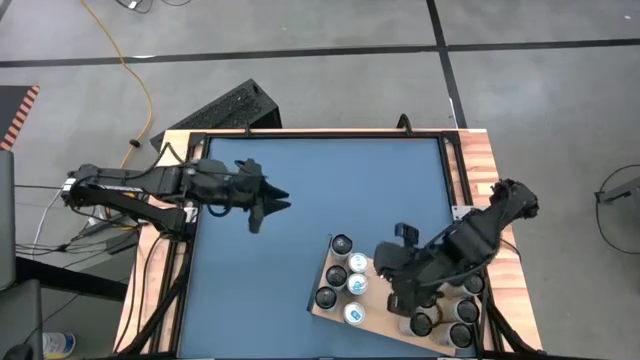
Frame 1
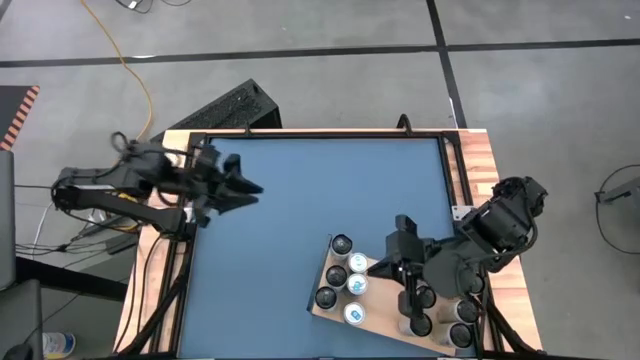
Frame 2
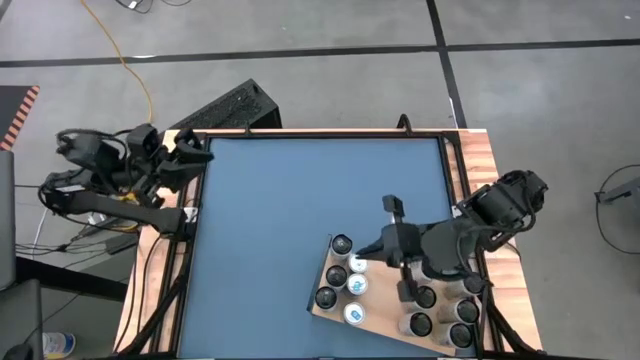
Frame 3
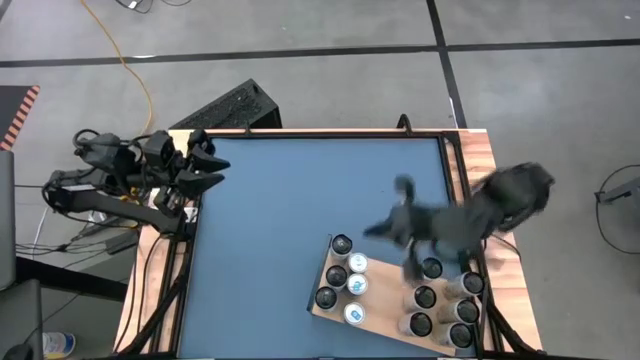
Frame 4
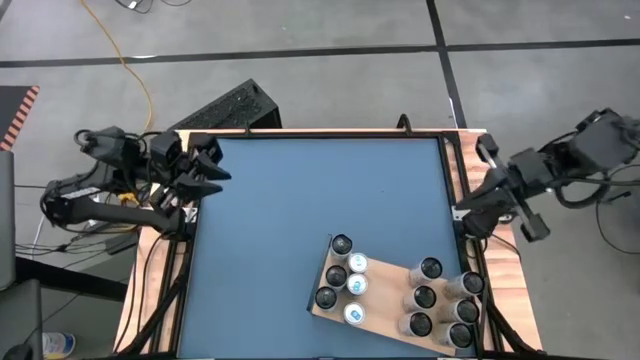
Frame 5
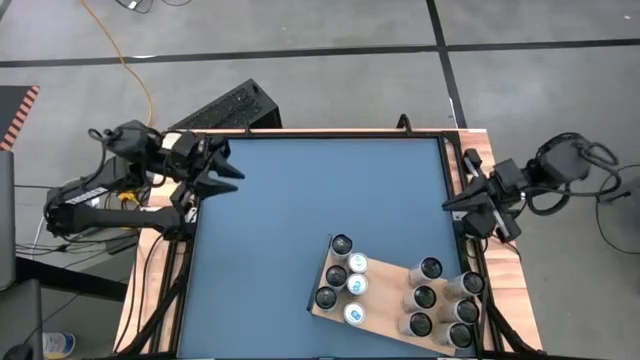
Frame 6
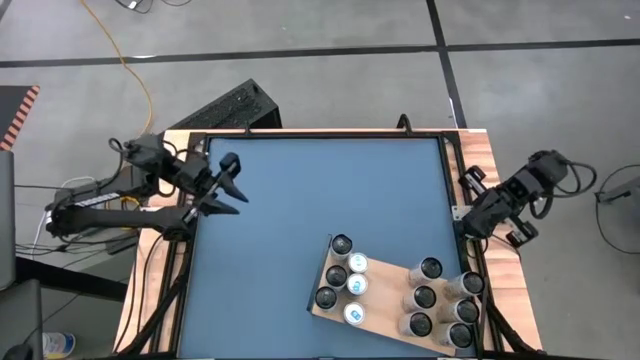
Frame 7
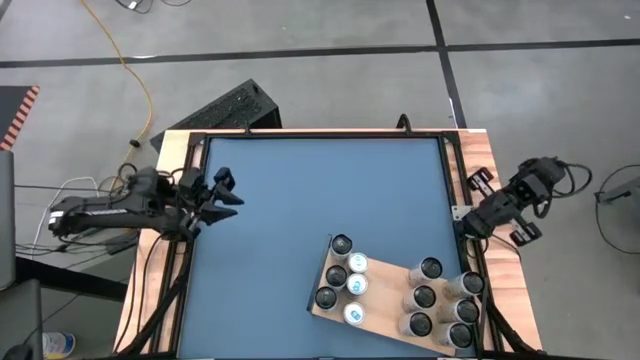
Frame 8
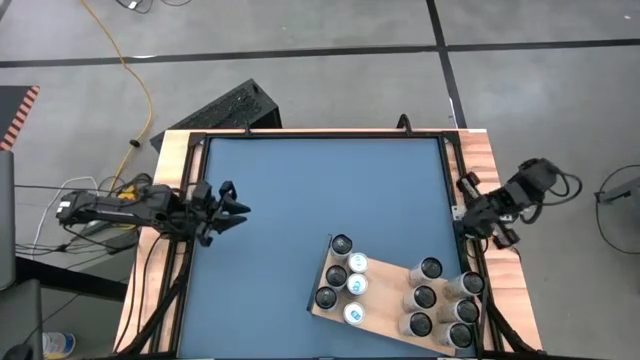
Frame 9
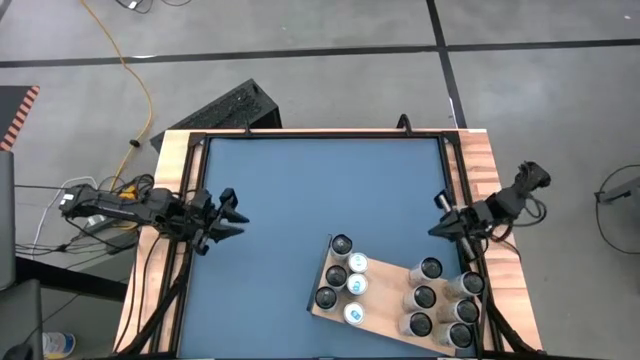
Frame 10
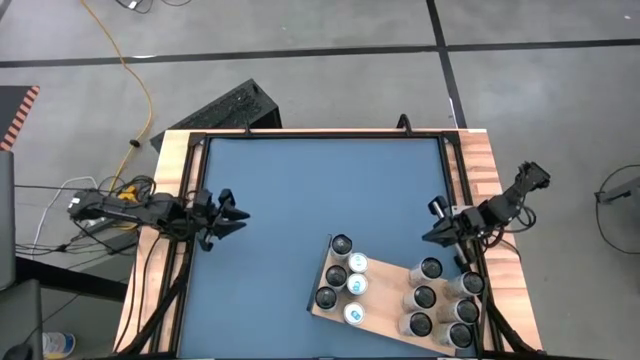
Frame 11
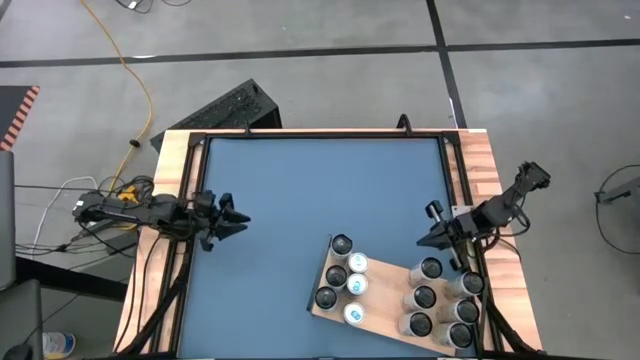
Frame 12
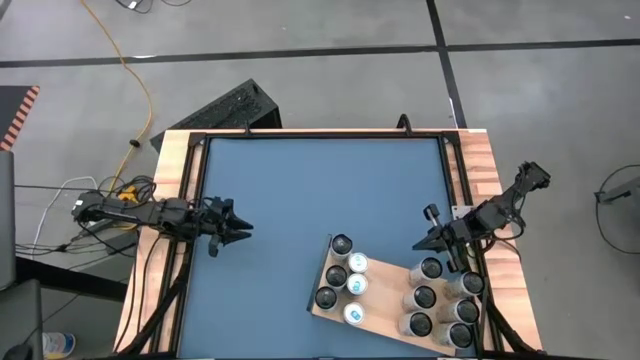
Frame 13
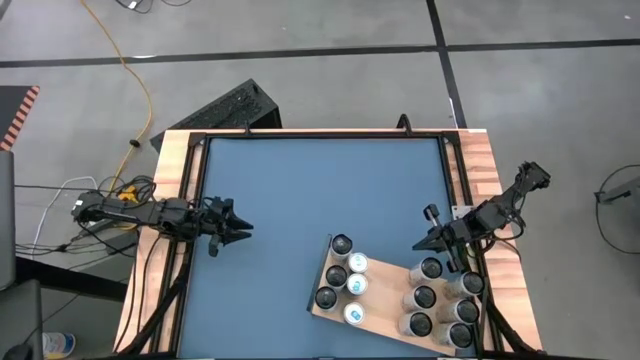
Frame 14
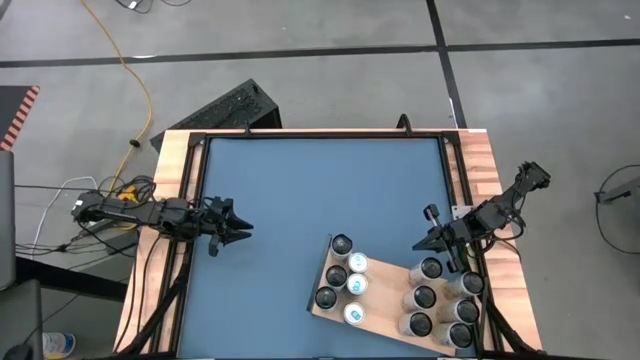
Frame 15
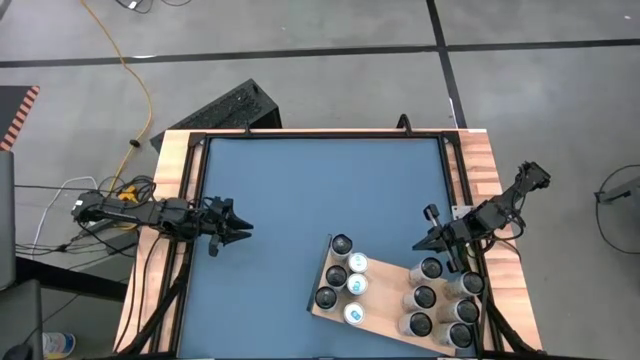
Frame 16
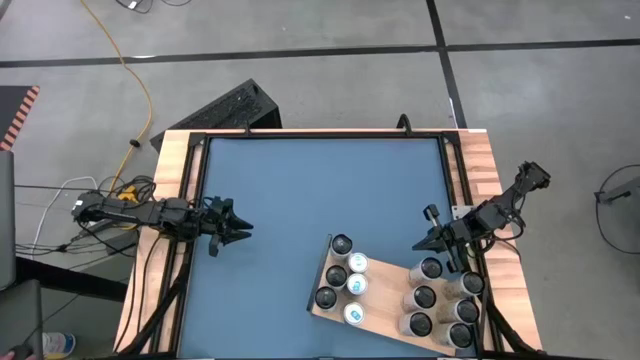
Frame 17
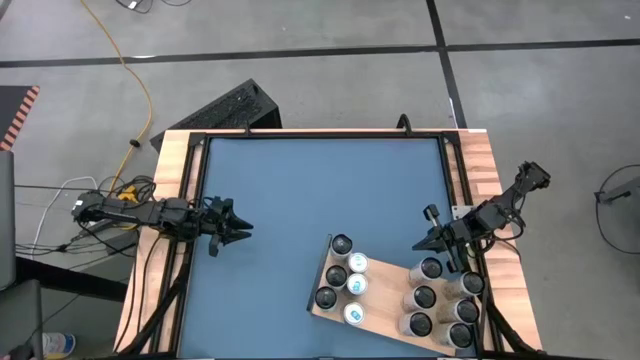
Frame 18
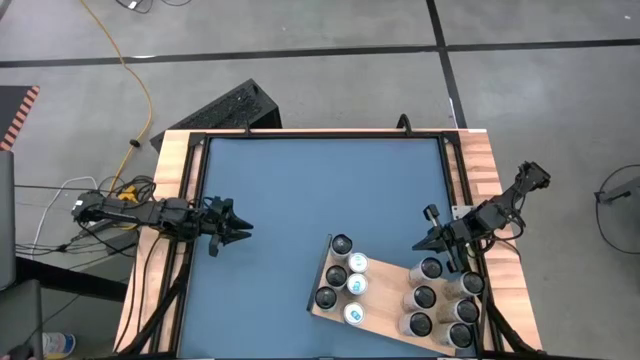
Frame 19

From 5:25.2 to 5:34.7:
Task: Place canned beverage on shelf
Return to Home Position

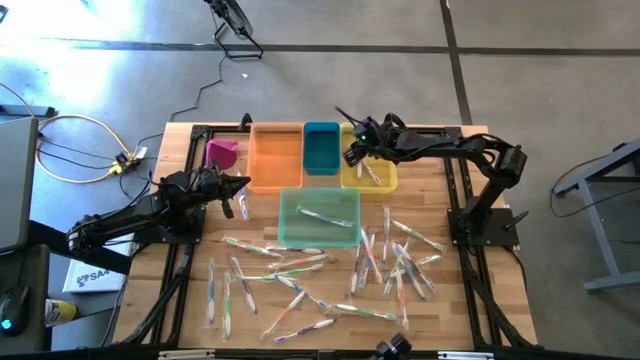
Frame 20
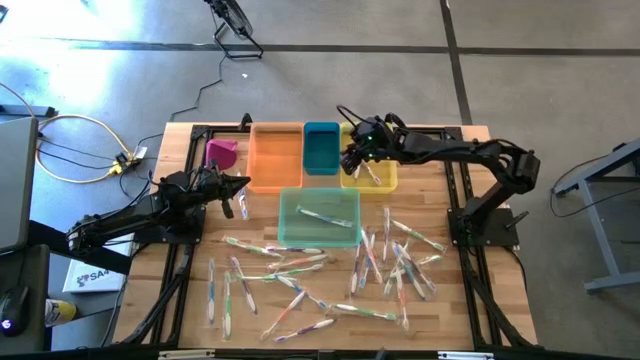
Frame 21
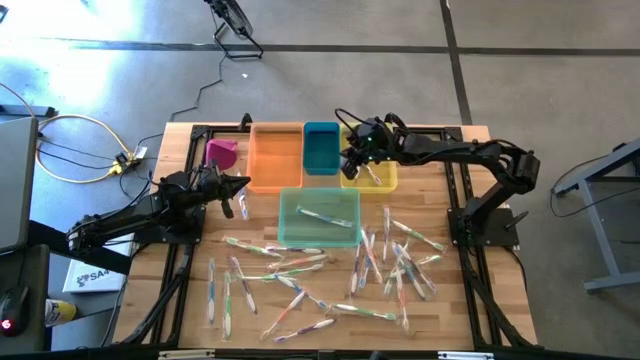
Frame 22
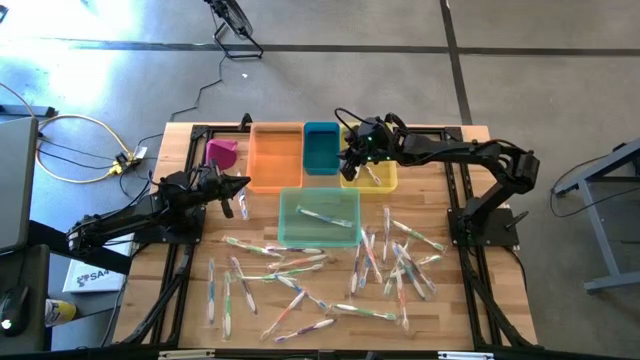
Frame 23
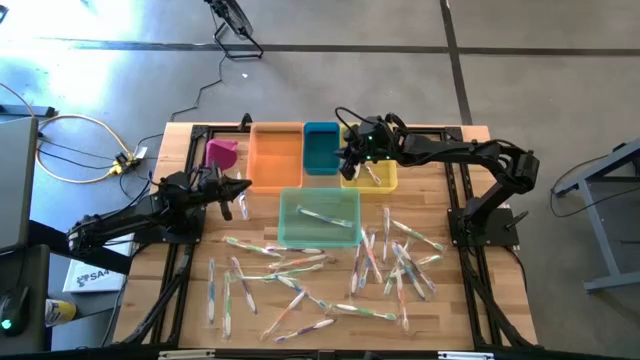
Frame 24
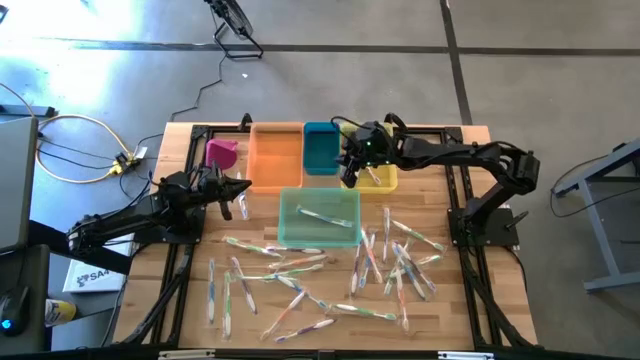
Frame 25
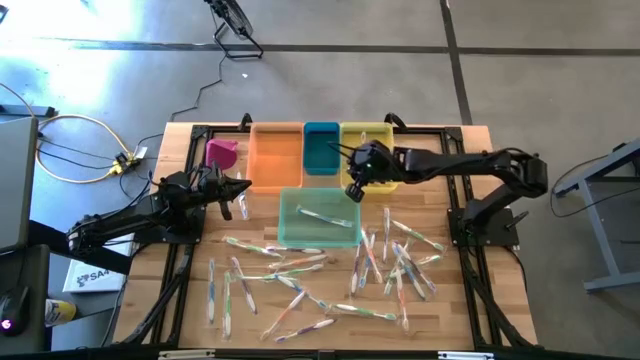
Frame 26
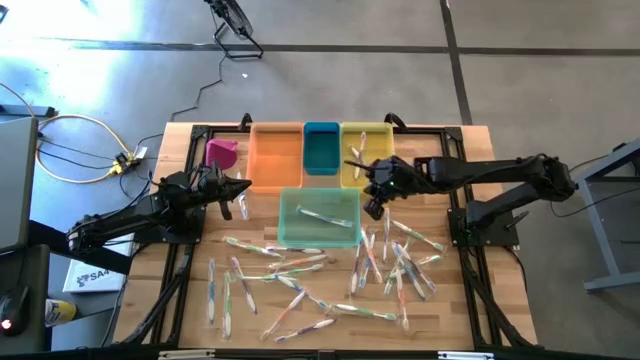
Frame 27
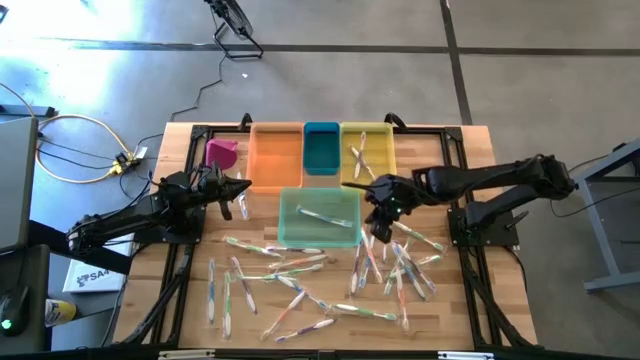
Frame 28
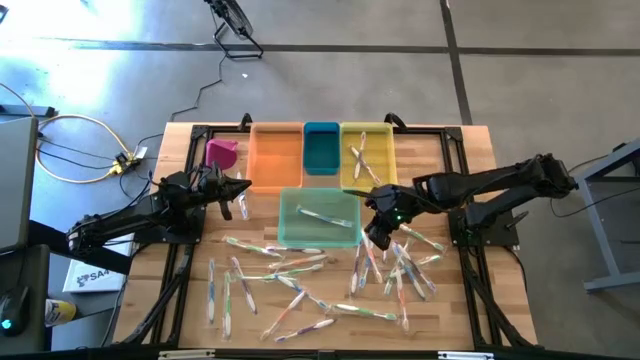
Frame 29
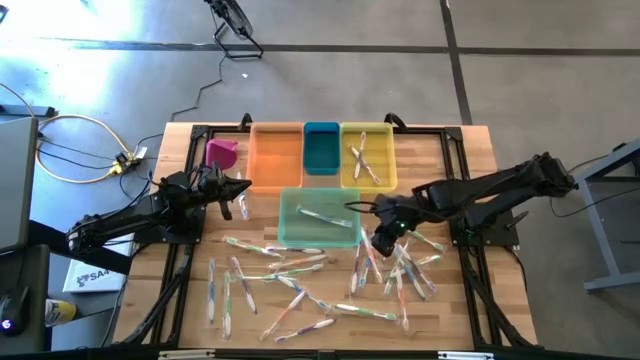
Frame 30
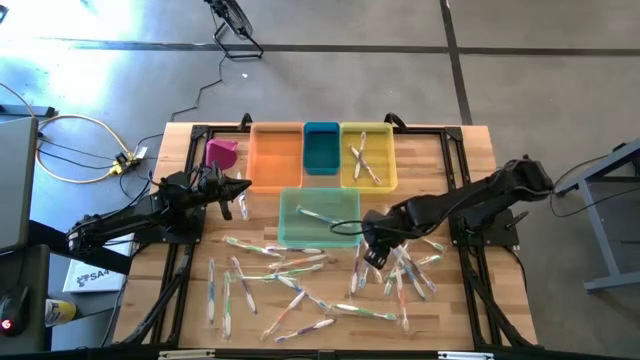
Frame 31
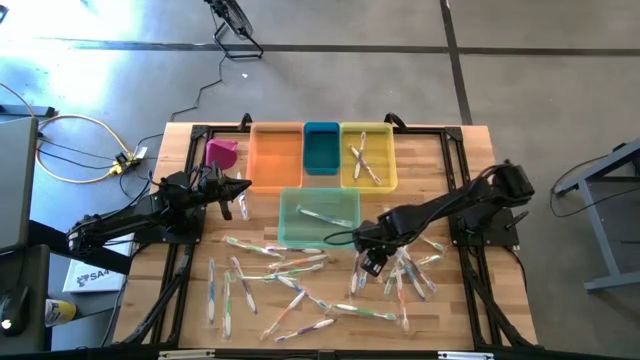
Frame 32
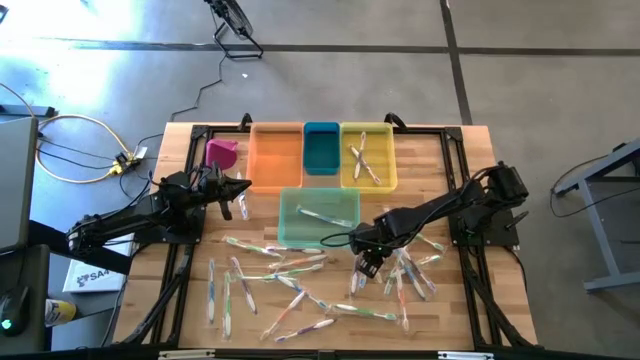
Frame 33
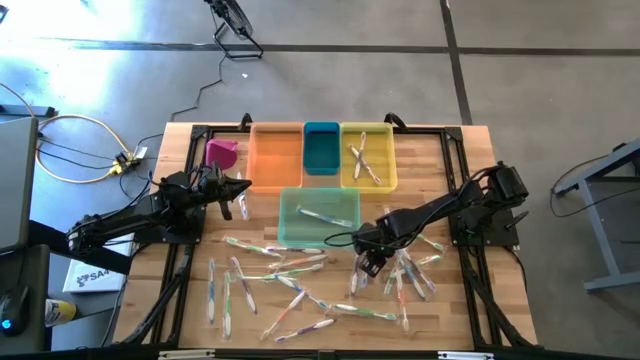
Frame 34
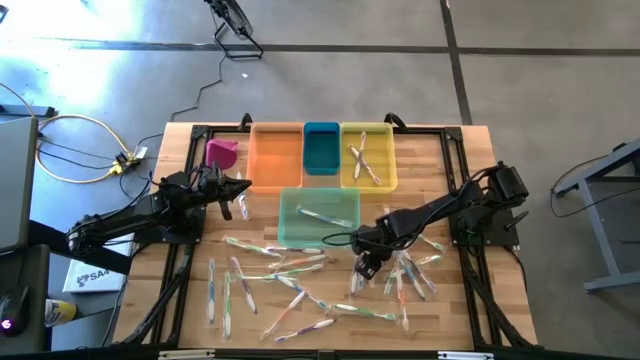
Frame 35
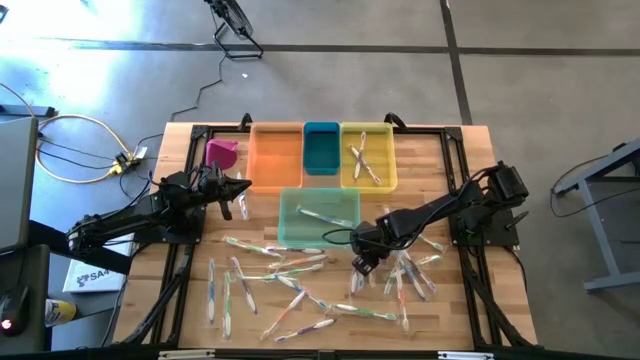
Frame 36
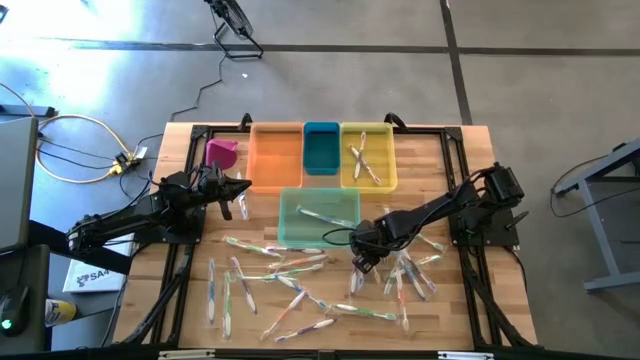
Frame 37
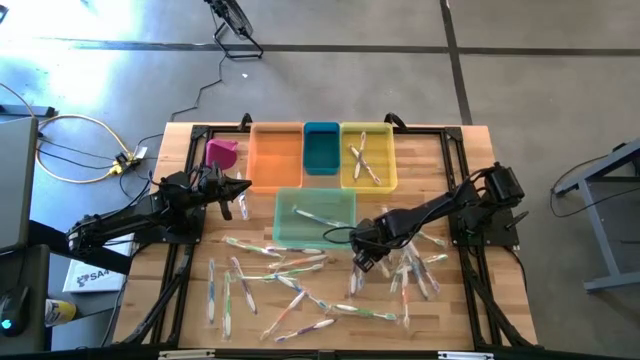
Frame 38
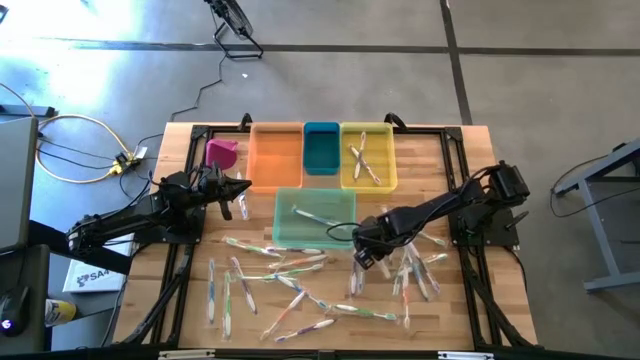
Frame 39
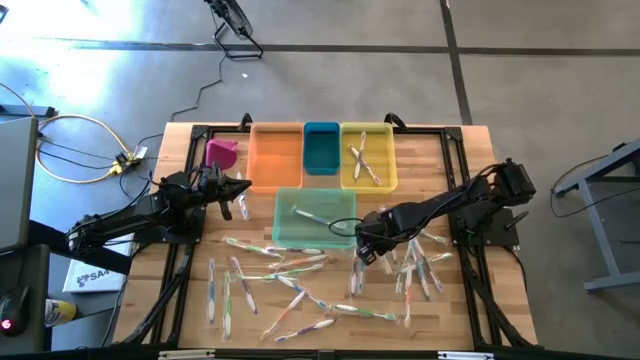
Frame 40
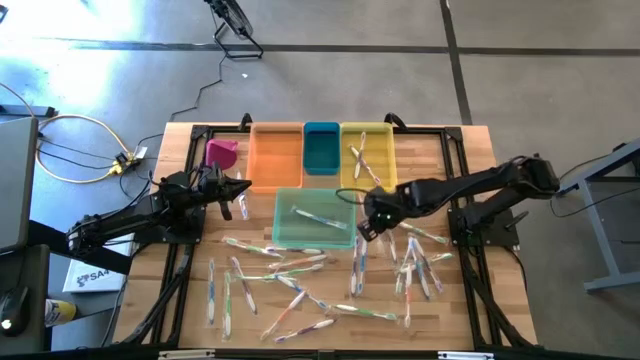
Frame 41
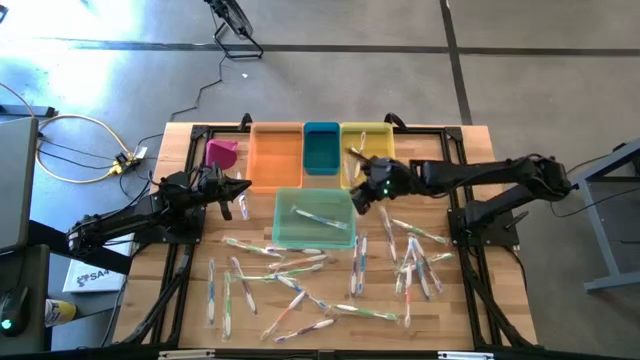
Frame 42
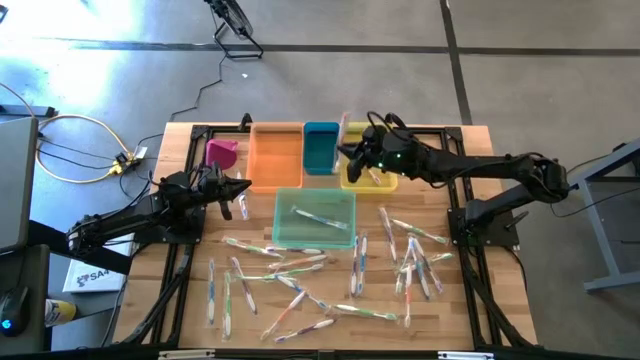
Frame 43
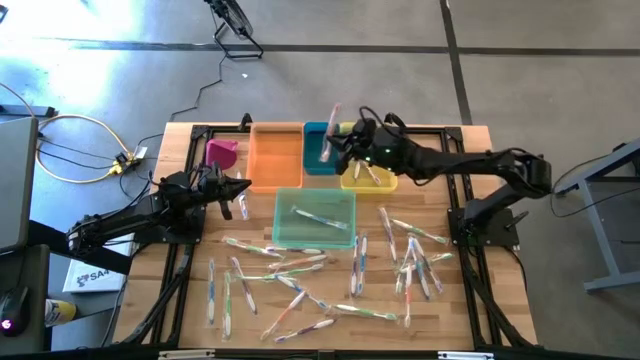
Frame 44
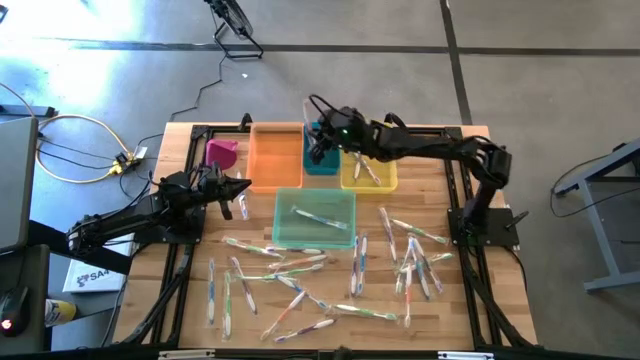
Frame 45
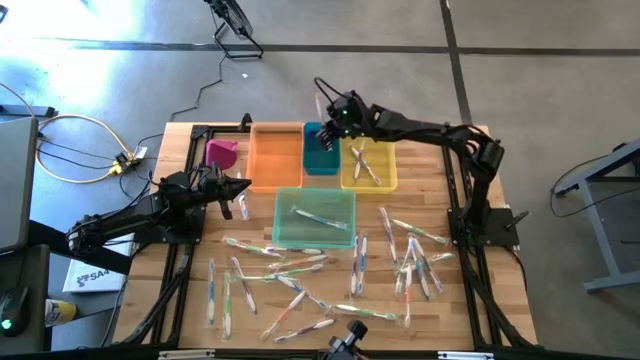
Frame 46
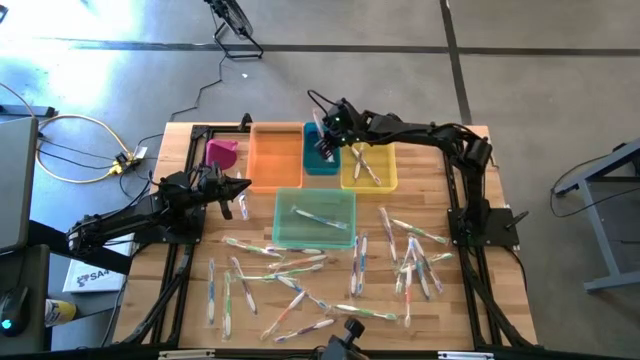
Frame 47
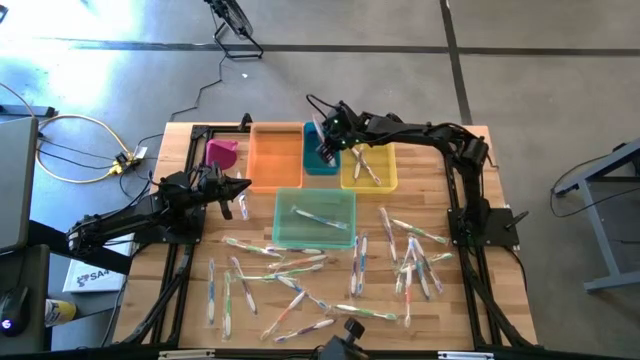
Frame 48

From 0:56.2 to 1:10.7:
Task: Pick & Place Toothbrushes
Put the orange toothbrush into the blue bin
